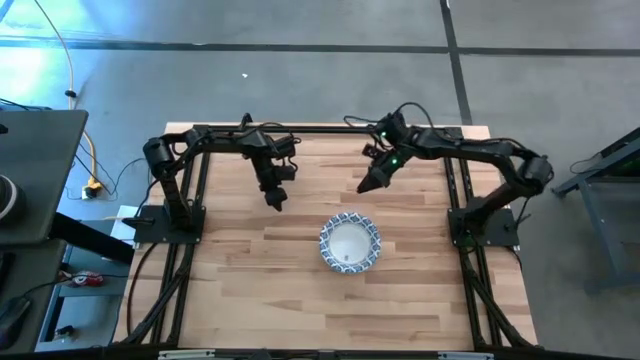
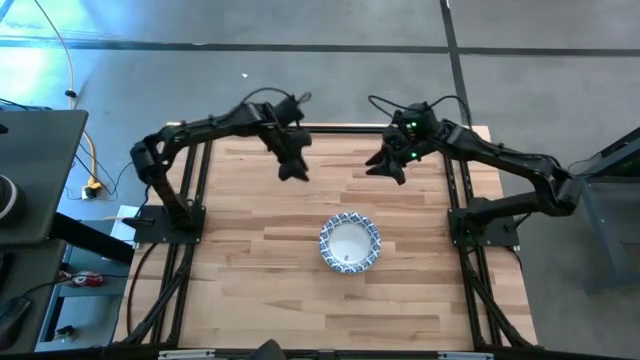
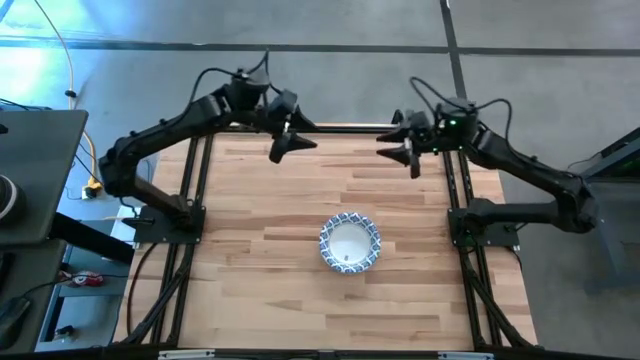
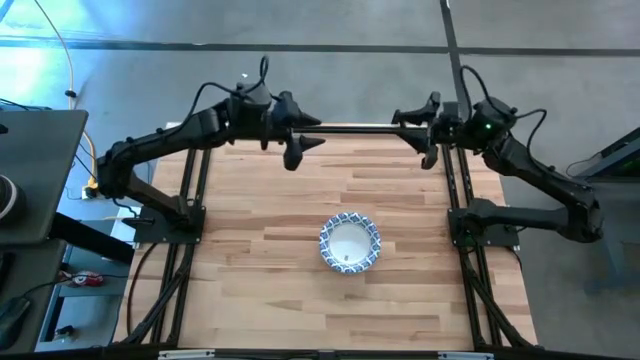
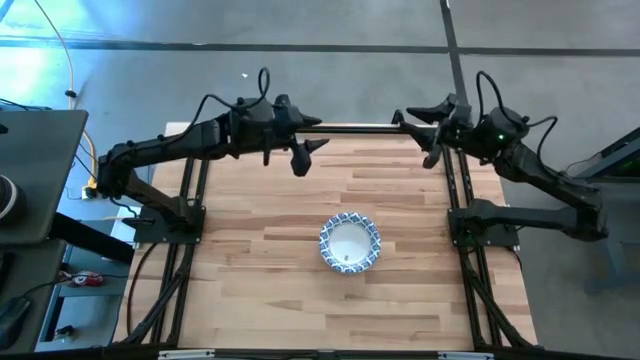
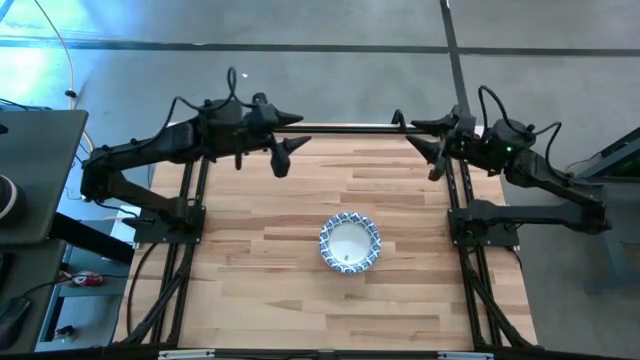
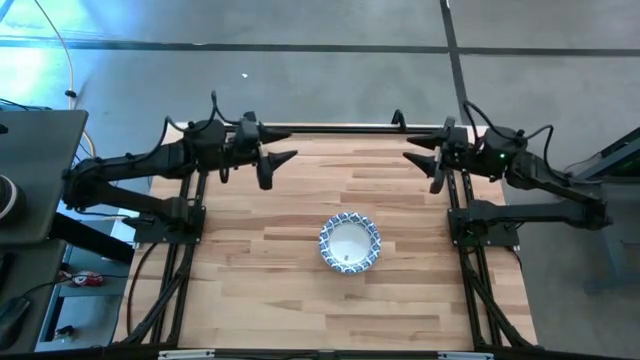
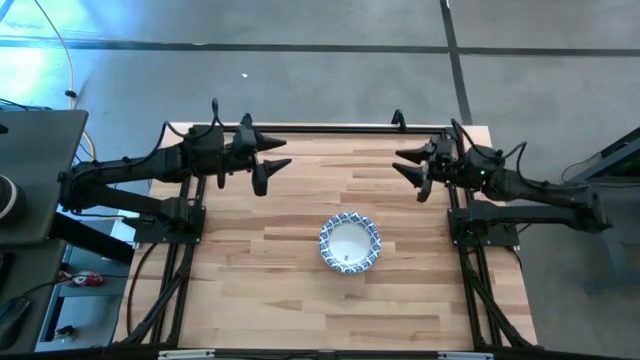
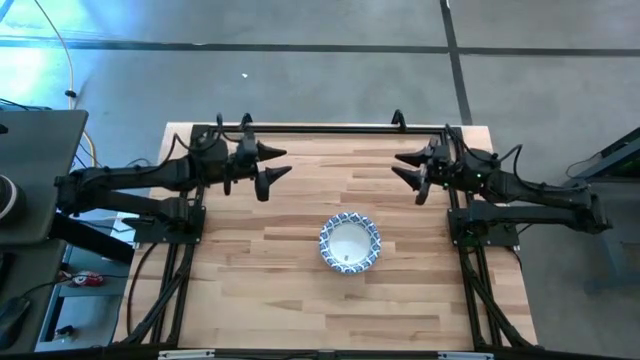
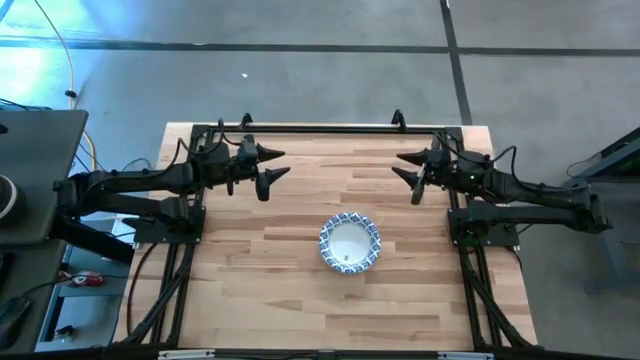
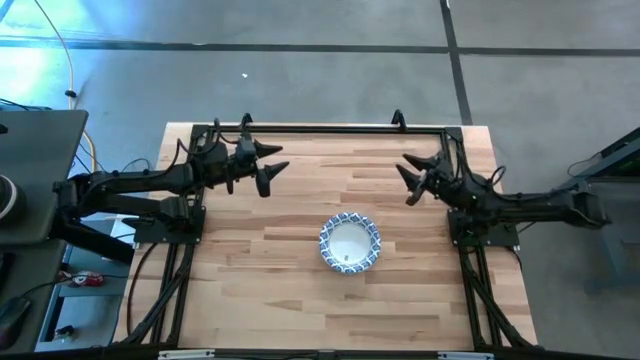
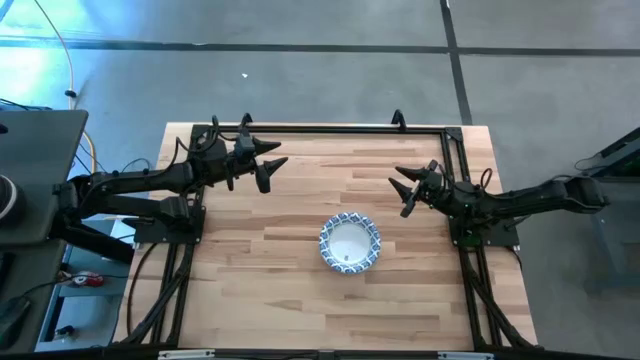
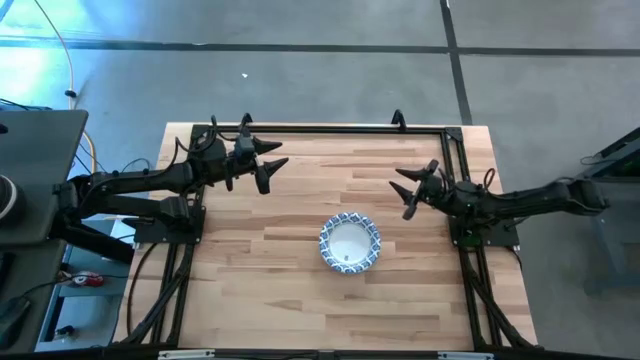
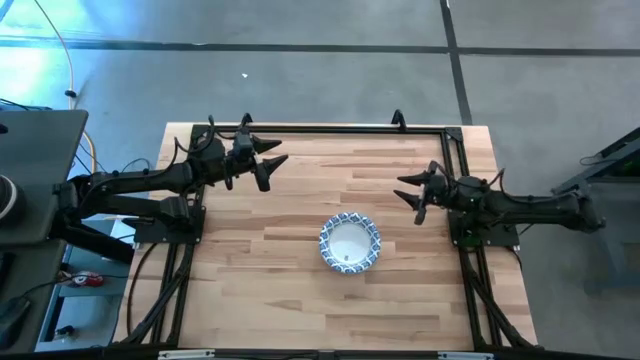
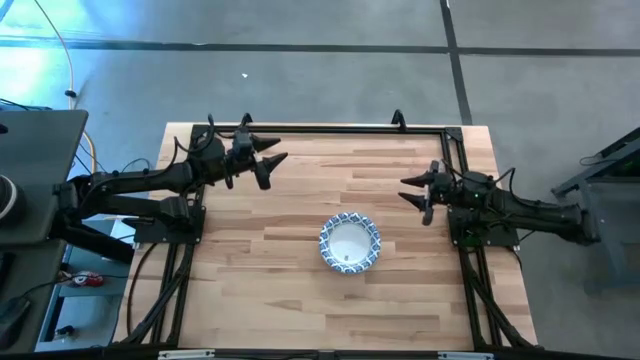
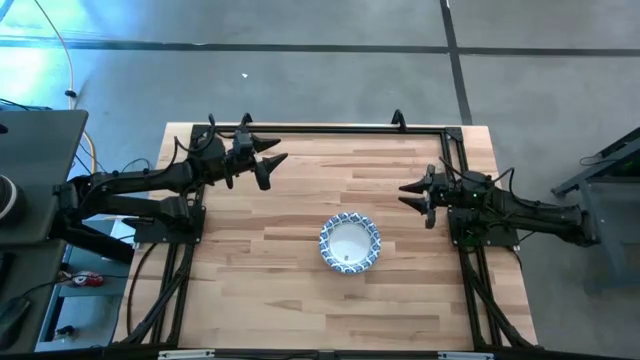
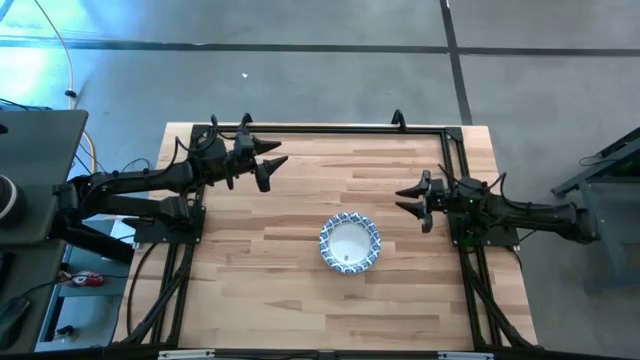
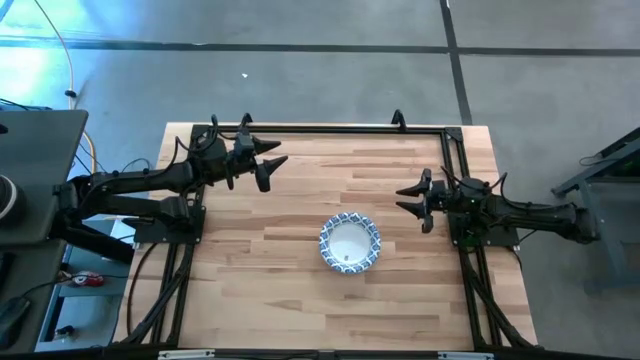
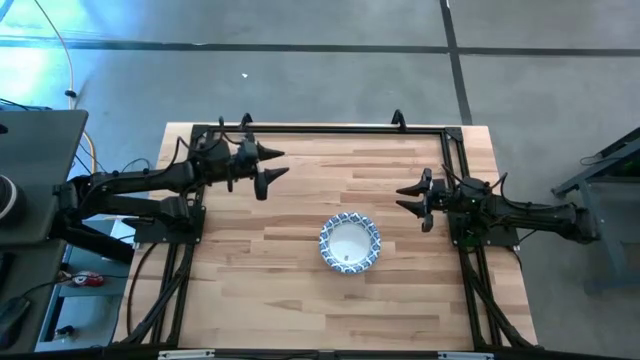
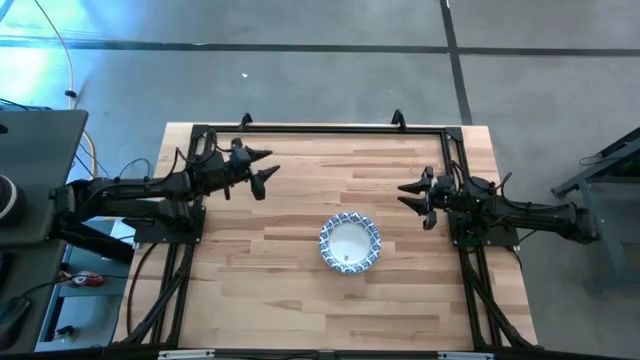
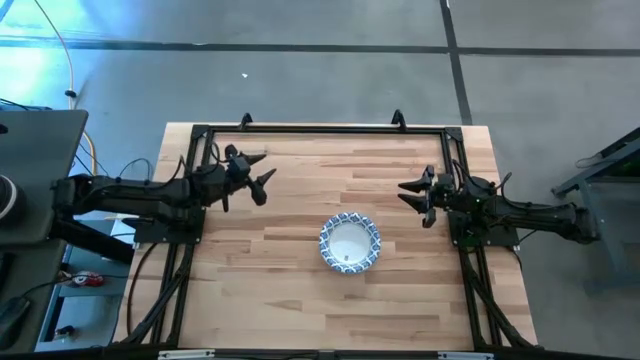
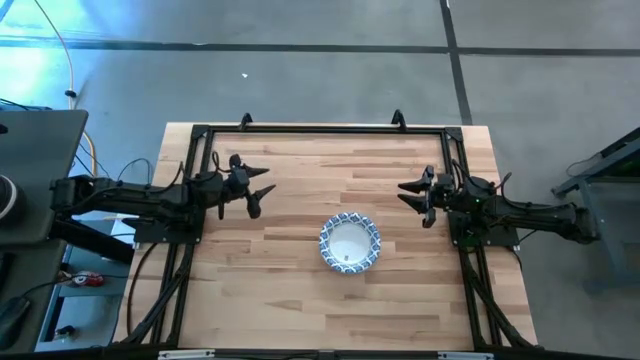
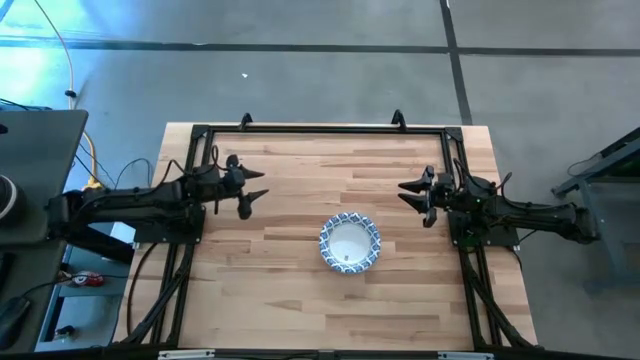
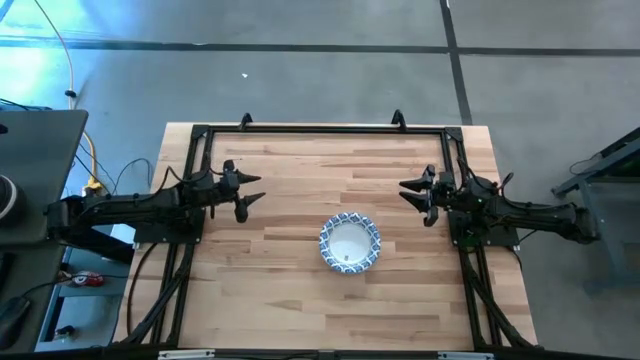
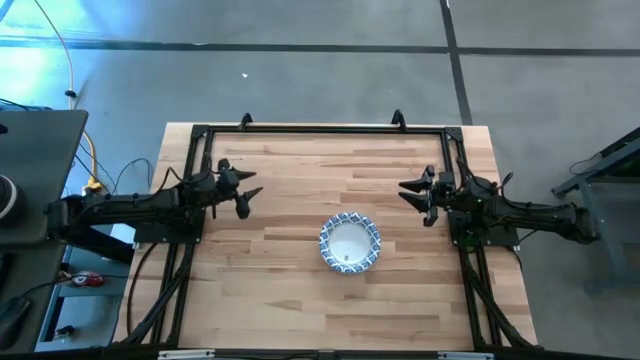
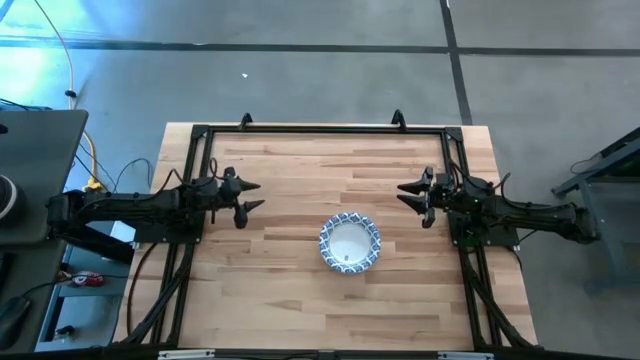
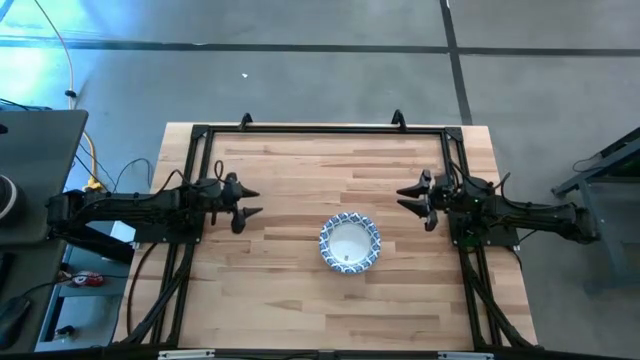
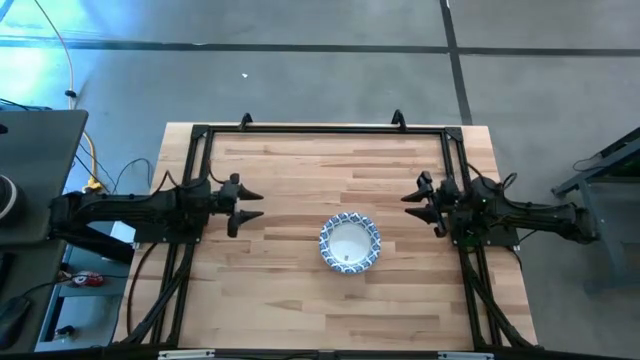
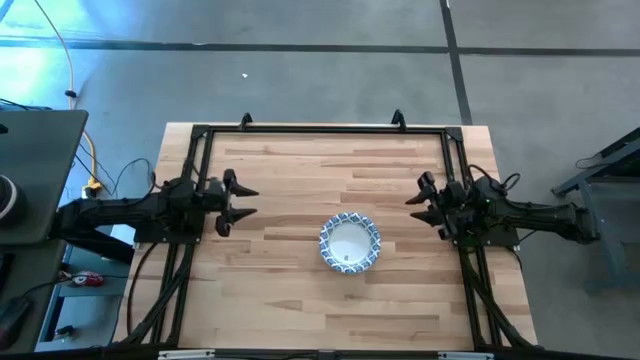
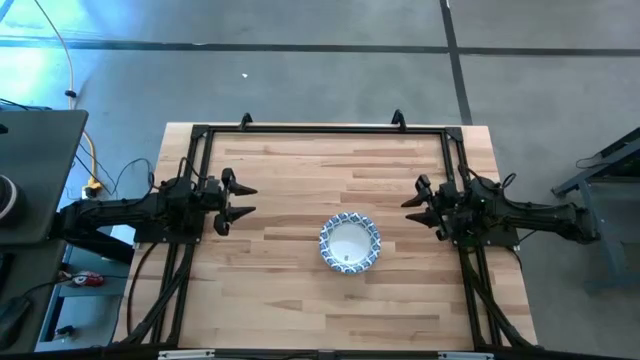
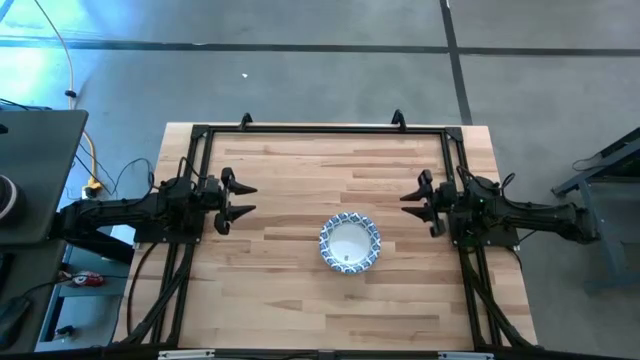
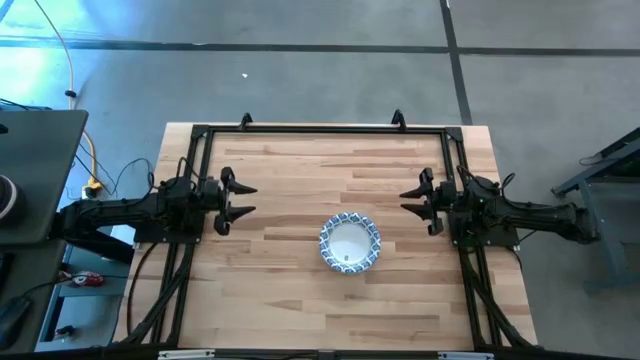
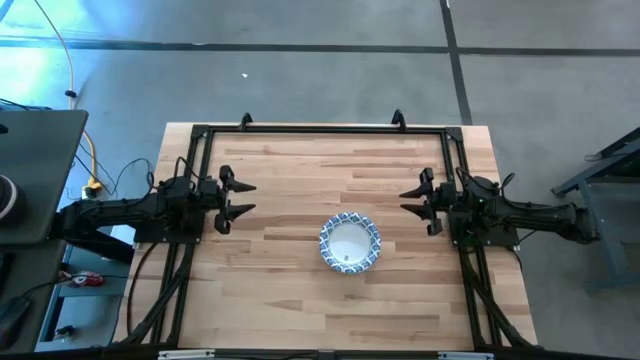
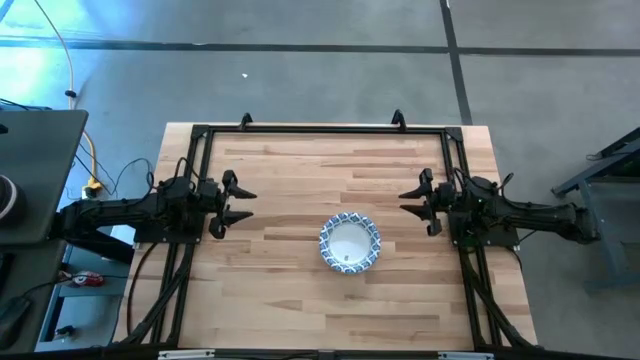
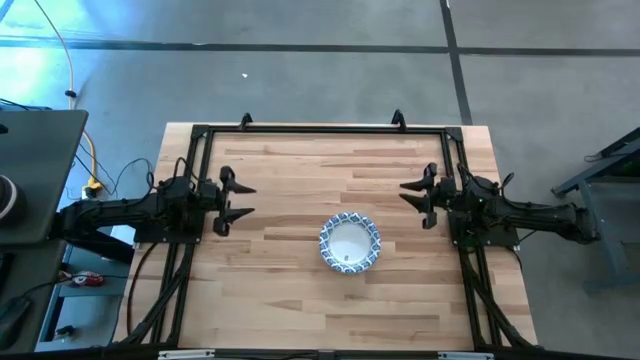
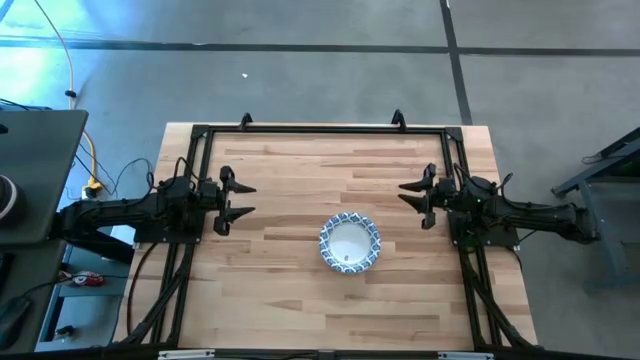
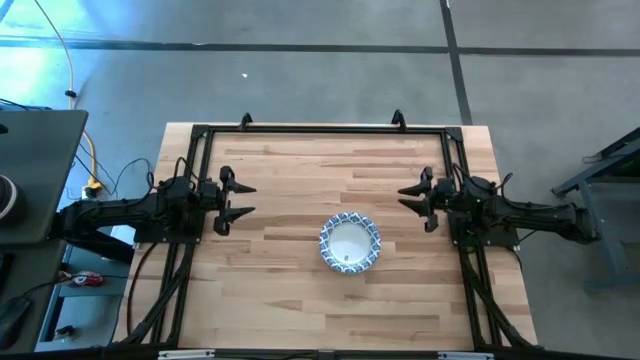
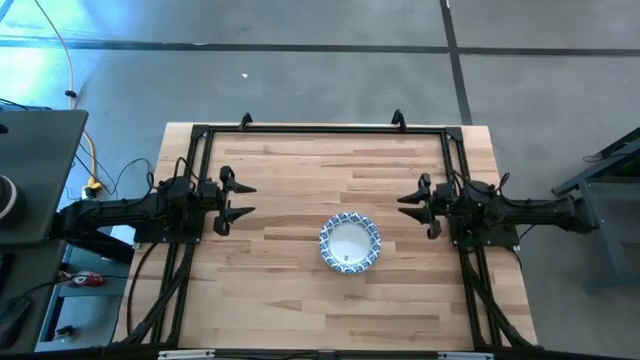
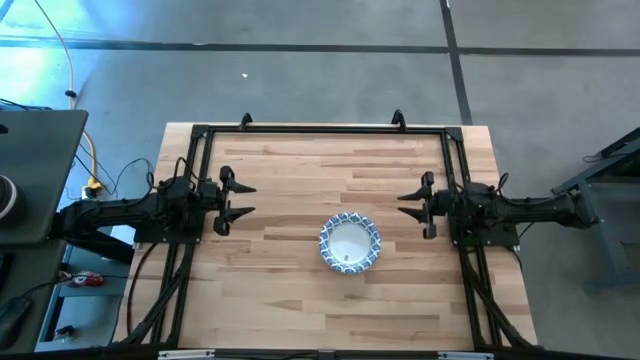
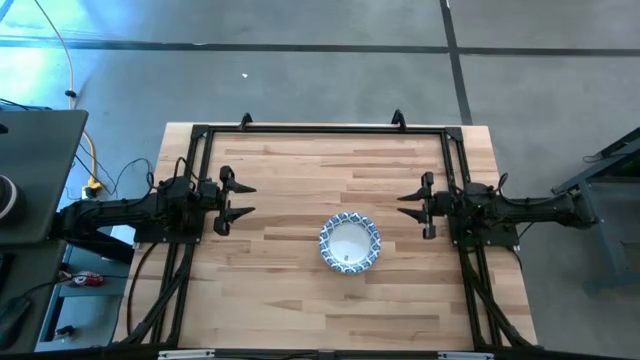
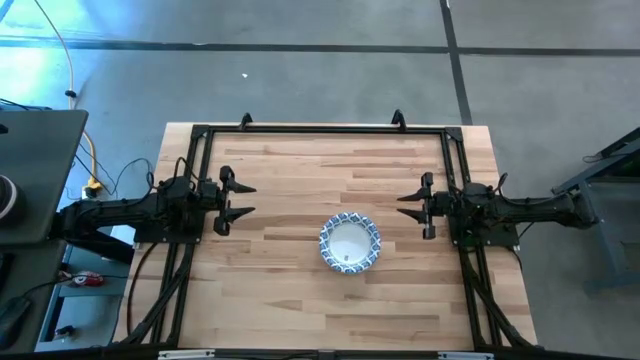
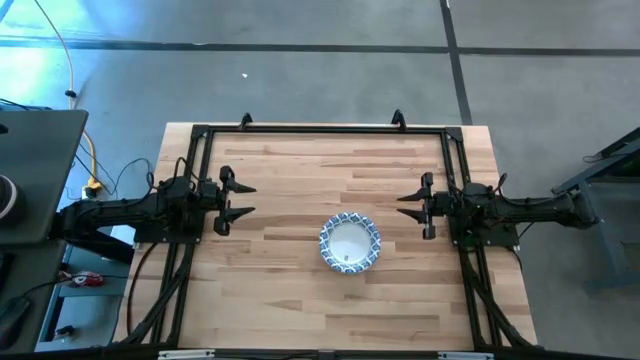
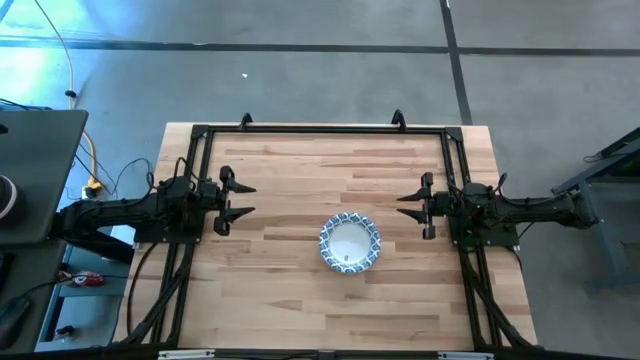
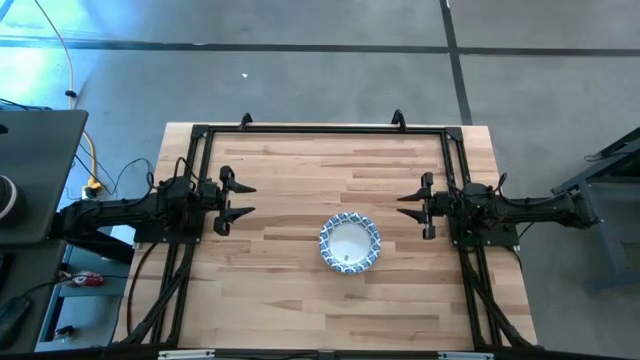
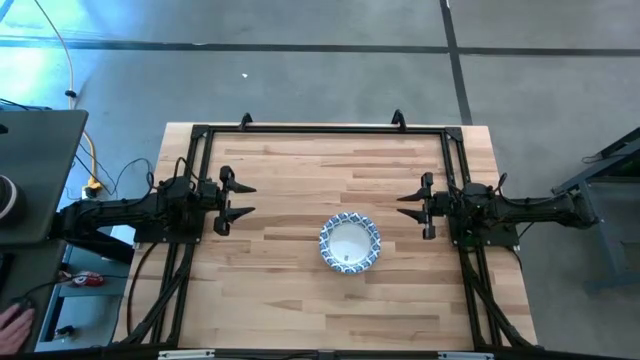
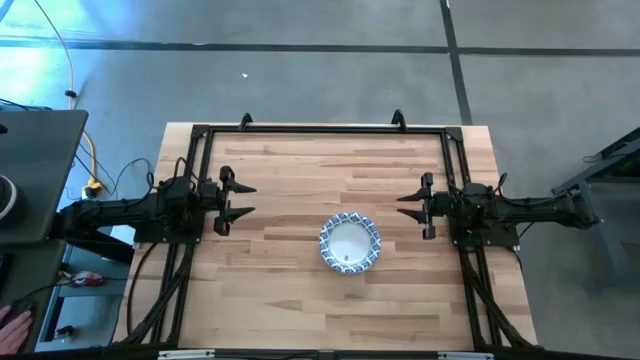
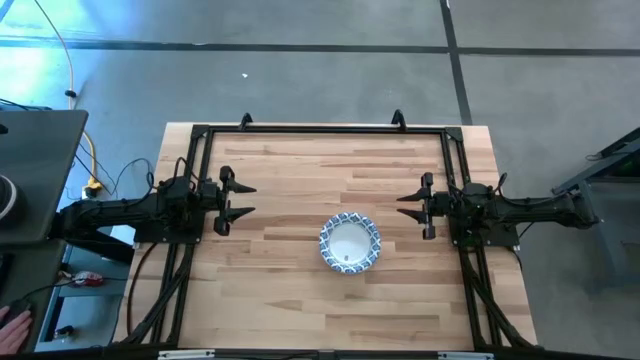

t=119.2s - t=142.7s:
Task: Nest bowls inside each other
Return to Home Position
